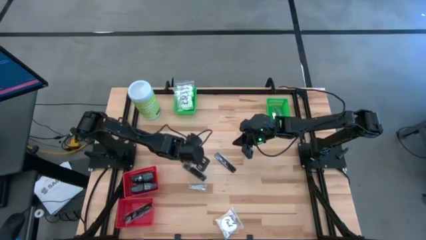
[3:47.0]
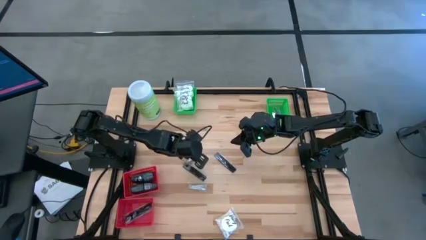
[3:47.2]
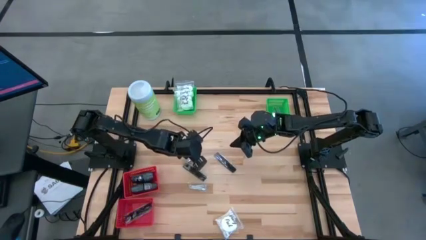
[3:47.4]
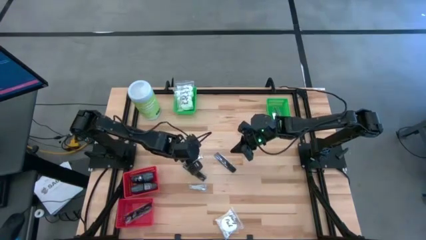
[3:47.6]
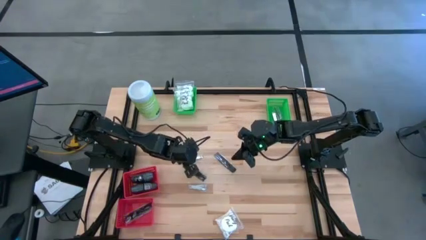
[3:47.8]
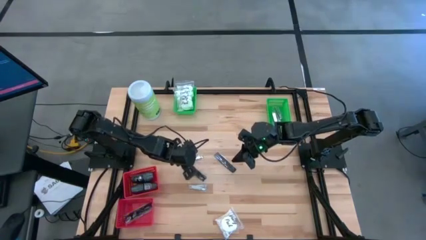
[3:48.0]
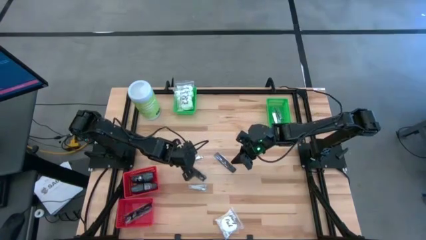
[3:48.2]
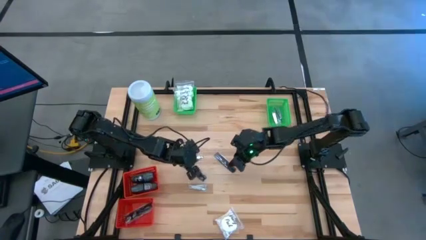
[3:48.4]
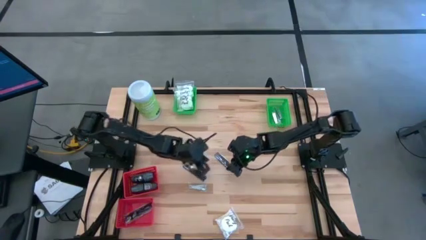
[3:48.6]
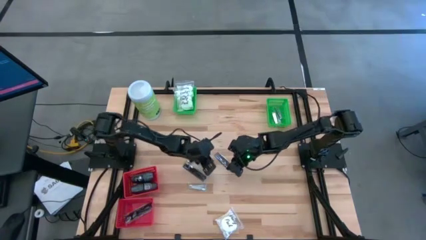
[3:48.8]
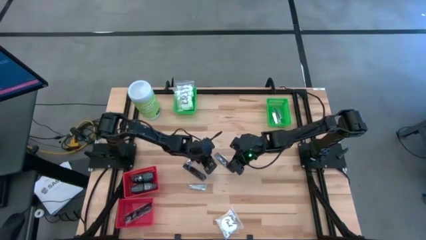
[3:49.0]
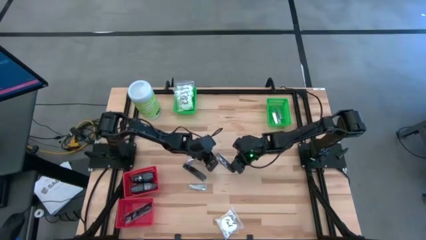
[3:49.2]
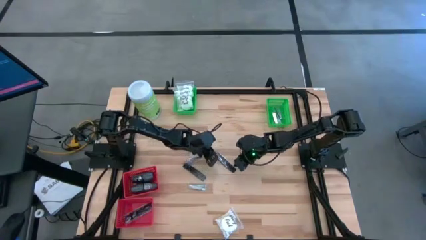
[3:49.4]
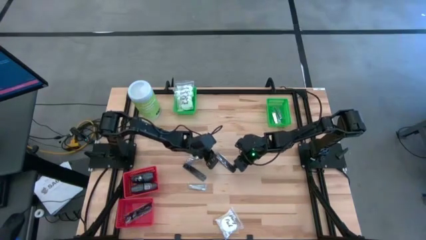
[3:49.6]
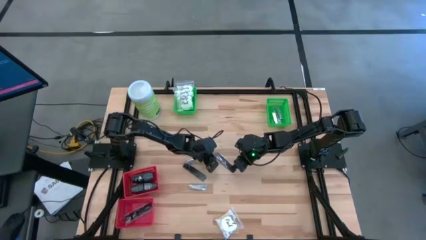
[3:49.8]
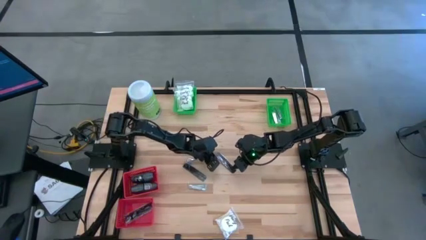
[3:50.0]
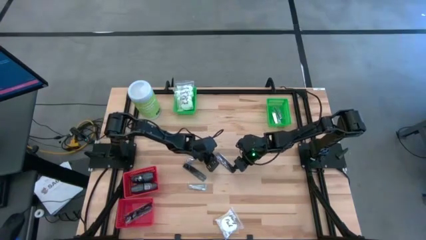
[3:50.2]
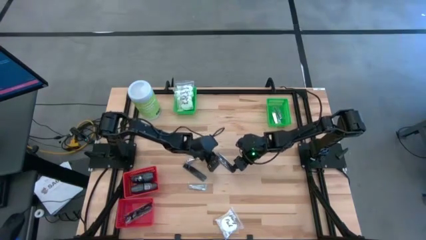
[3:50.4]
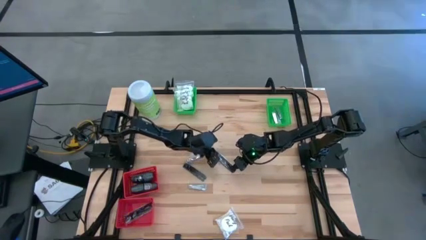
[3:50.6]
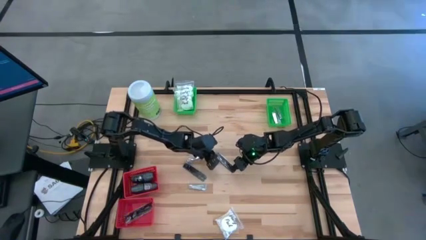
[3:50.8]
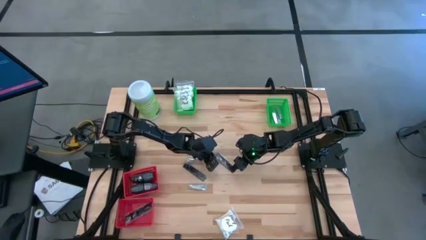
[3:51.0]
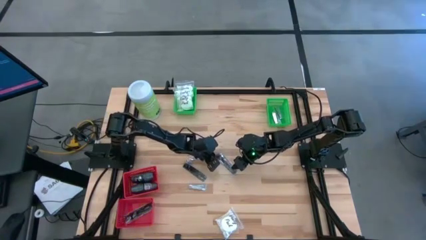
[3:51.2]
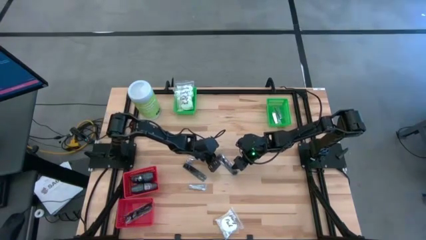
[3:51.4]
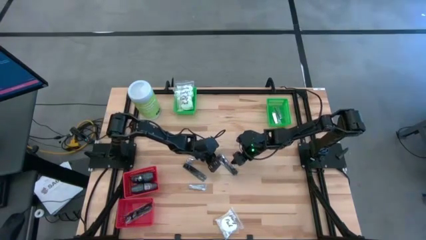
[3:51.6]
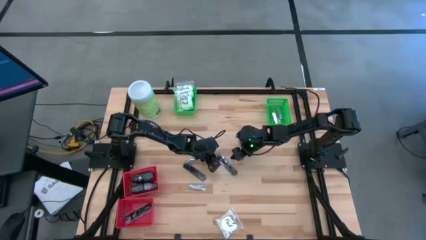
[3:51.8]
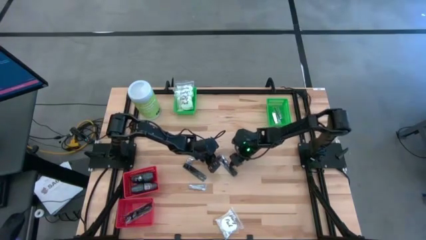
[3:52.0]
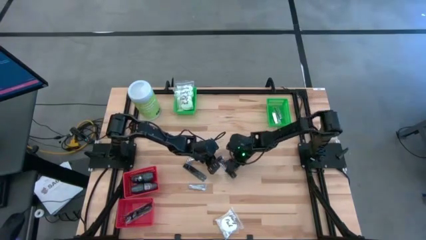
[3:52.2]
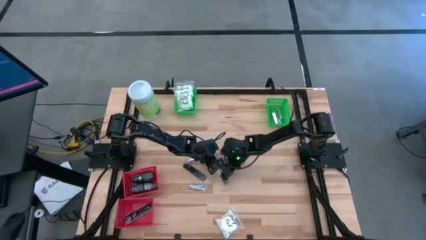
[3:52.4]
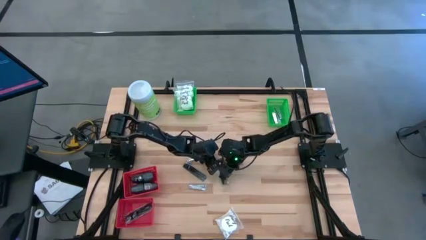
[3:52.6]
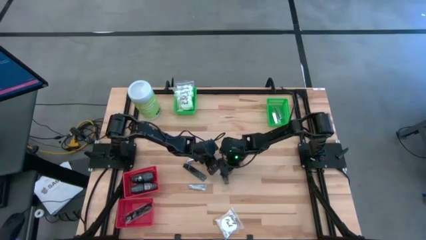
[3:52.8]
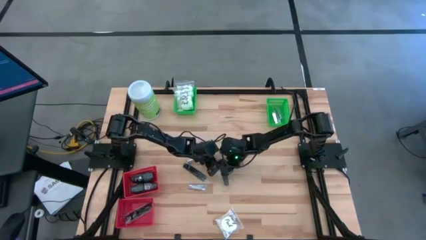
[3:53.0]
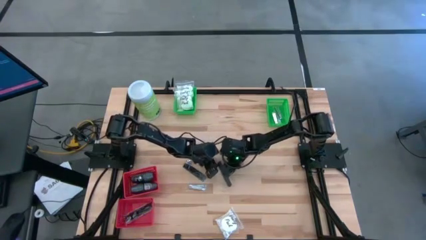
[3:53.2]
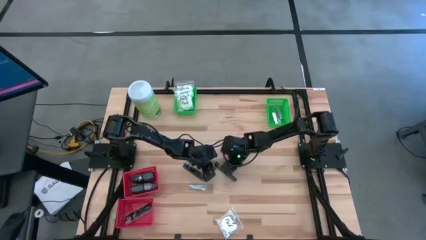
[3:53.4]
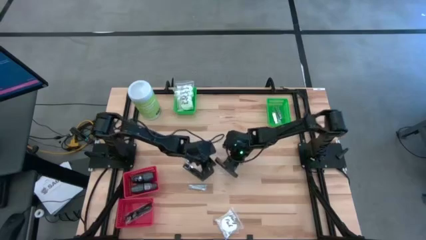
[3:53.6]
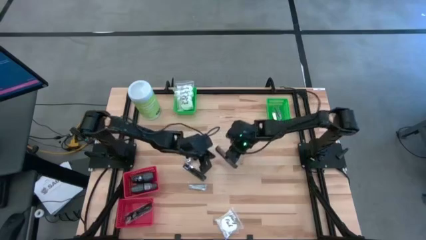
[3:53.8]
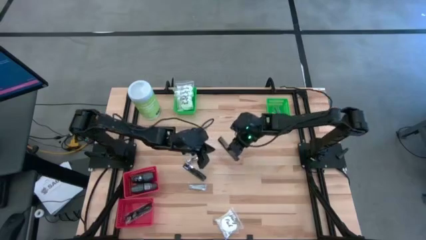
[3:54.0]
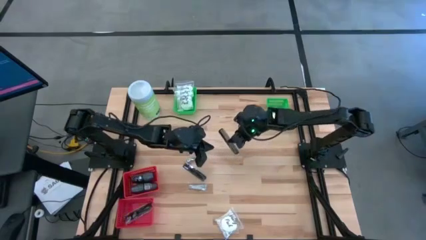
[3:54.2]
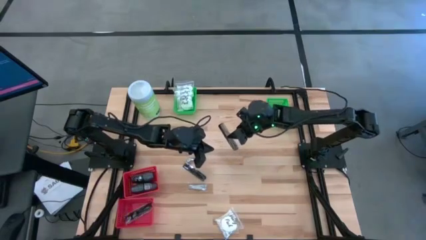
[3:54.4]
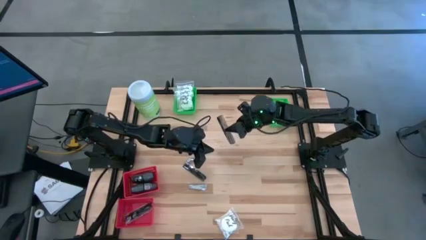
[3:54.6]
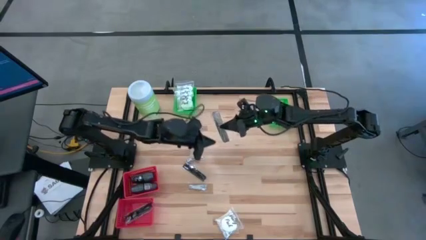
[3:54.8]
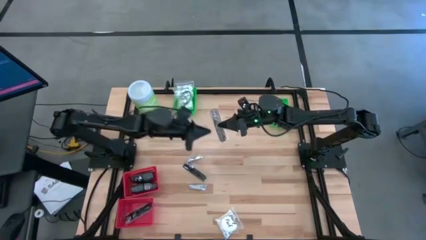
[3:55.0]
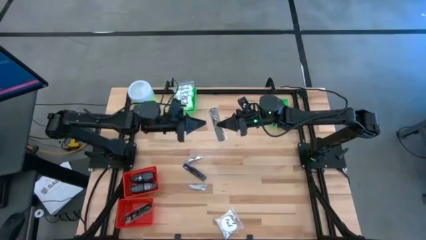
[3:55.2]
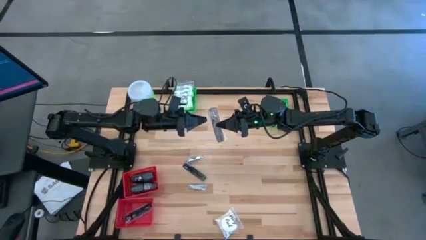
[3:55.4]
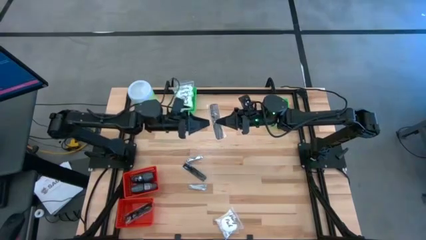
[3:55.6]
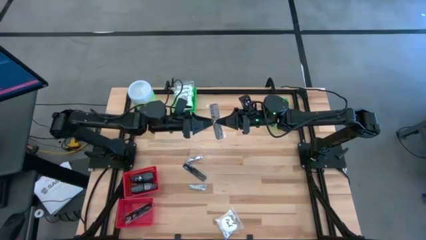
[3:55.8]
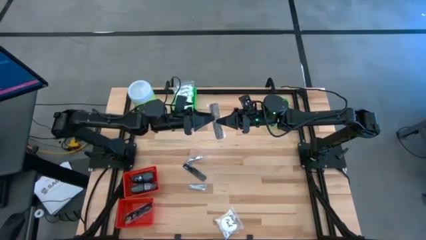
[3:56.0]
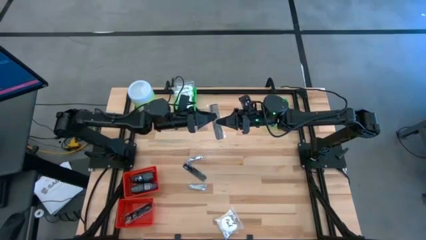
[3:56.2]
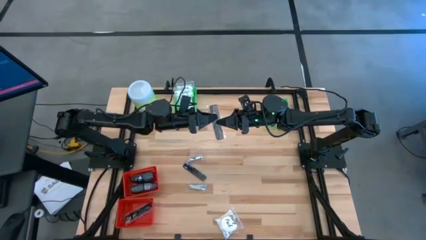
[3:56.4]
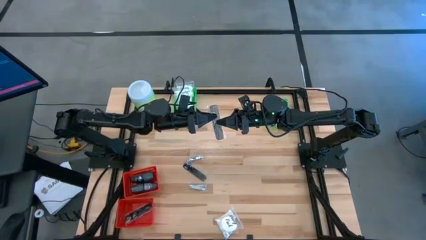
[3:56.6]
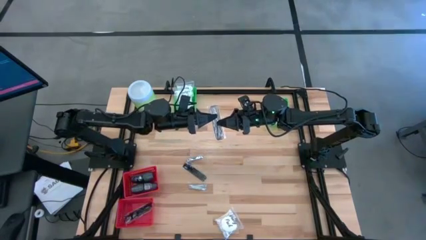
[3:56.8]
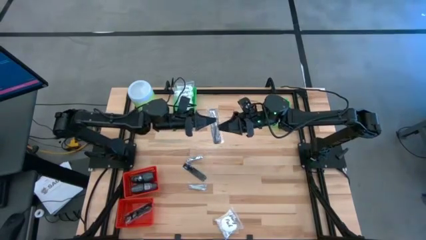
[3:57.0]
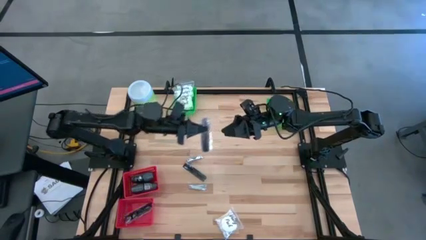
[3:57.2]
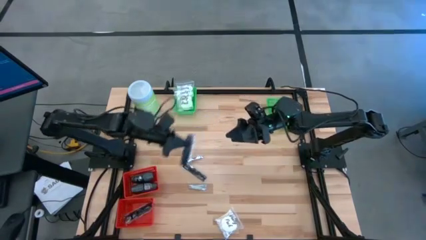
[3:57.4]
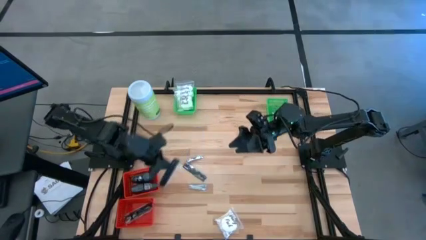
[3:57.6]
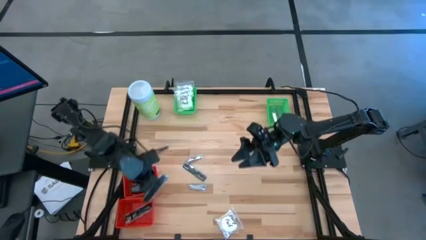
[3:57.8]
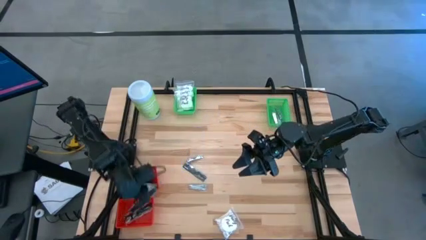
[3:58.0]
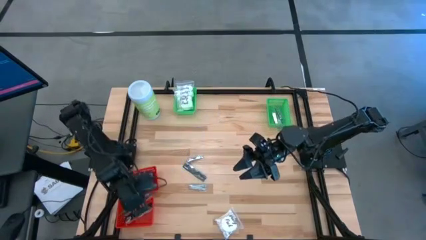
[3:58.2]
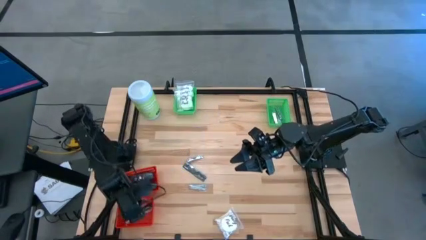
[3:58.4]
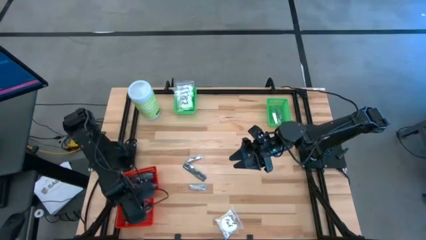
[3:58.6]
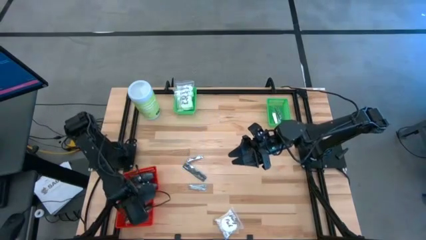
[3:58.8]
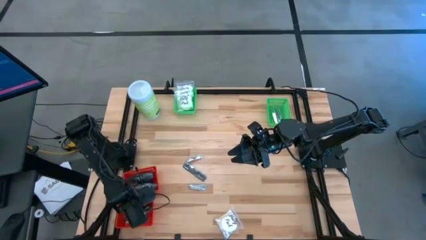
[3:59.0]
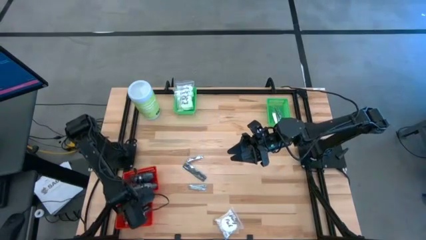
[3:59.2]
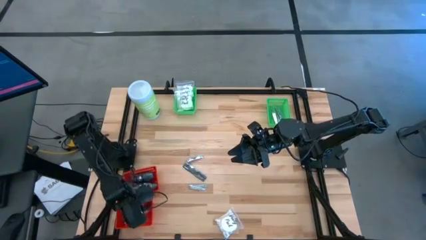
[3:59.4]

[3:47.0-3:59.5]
Task: Pick & Place Travel size toiletries
Put the black comb into the bottom red basket

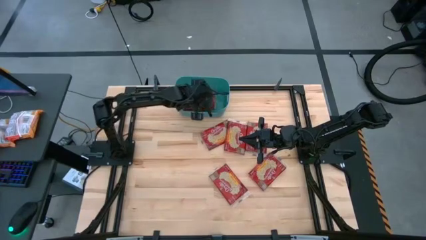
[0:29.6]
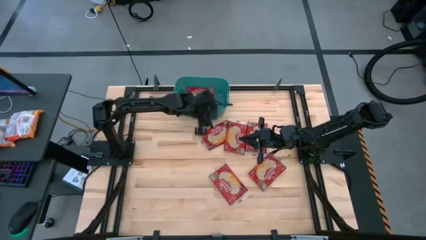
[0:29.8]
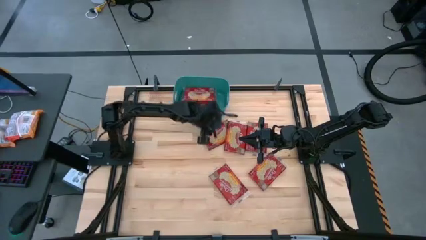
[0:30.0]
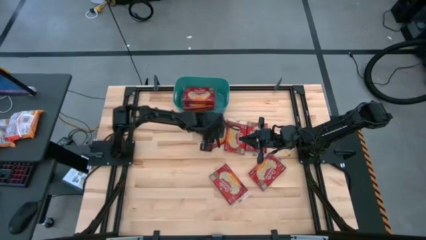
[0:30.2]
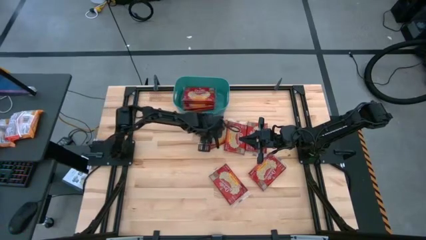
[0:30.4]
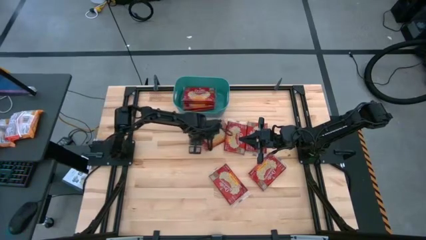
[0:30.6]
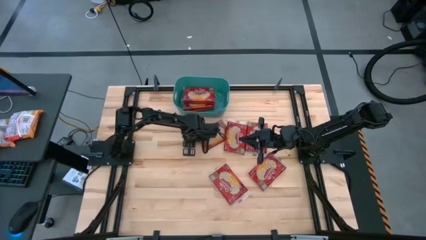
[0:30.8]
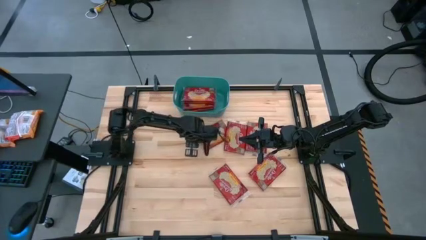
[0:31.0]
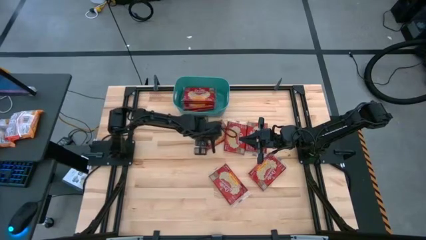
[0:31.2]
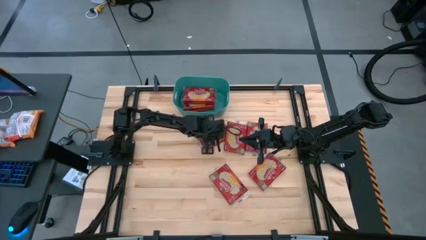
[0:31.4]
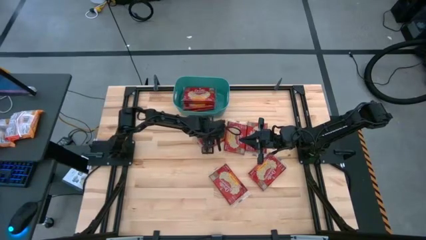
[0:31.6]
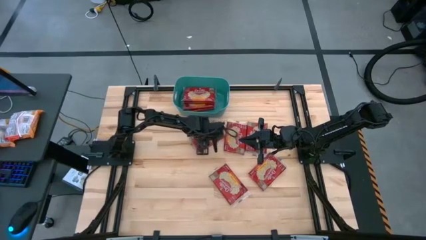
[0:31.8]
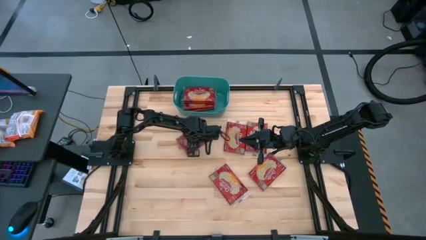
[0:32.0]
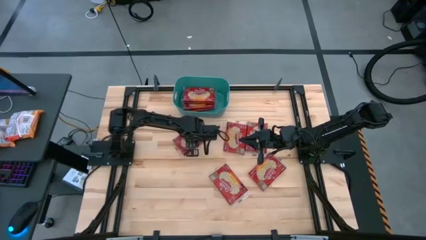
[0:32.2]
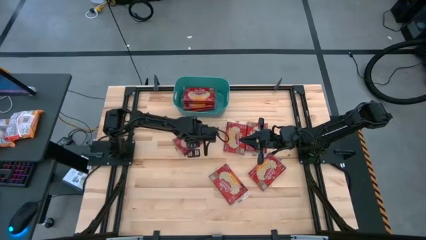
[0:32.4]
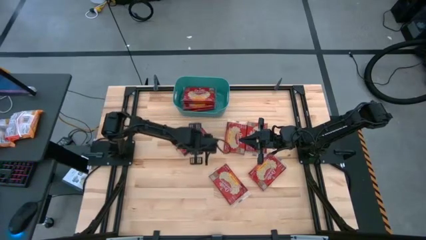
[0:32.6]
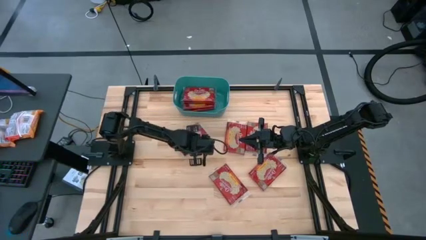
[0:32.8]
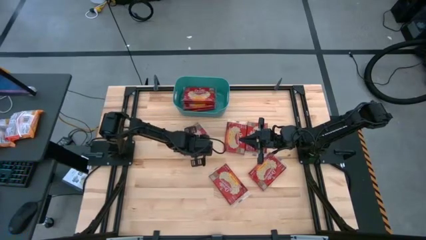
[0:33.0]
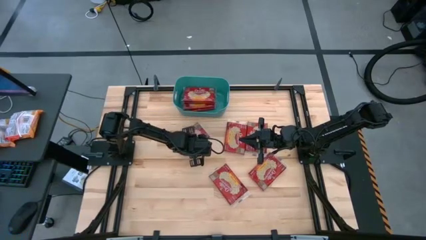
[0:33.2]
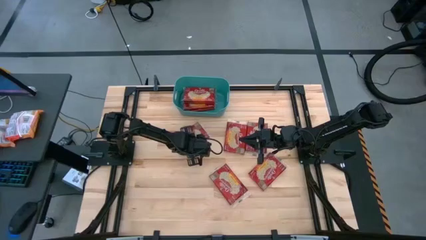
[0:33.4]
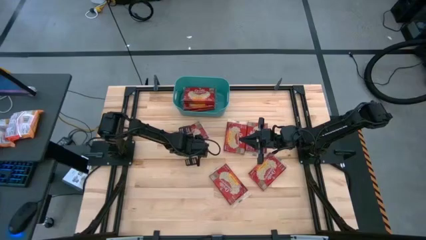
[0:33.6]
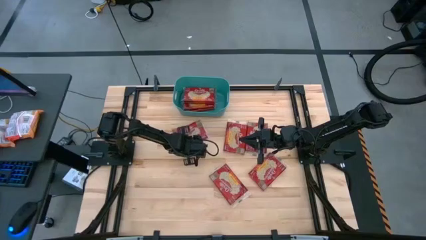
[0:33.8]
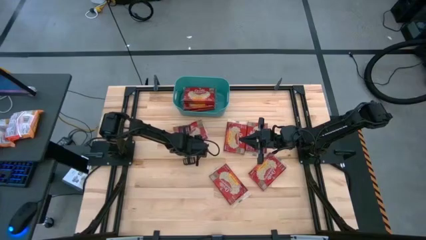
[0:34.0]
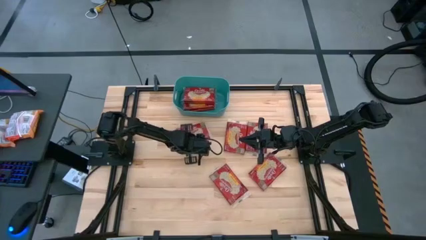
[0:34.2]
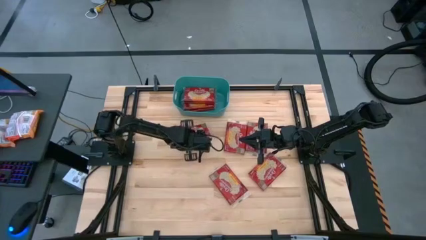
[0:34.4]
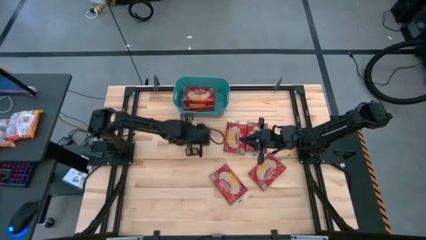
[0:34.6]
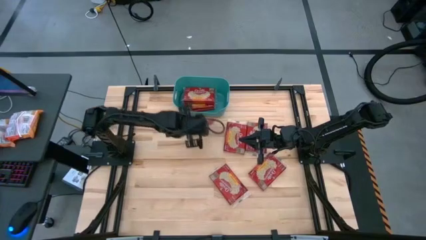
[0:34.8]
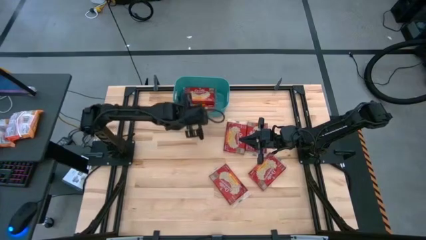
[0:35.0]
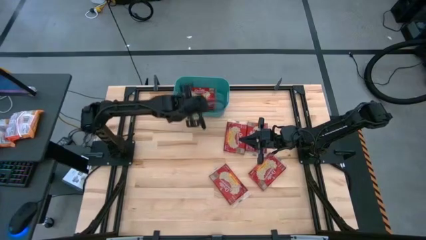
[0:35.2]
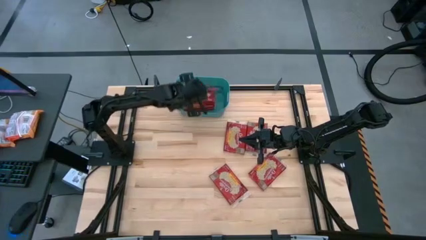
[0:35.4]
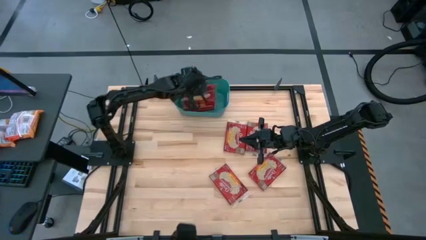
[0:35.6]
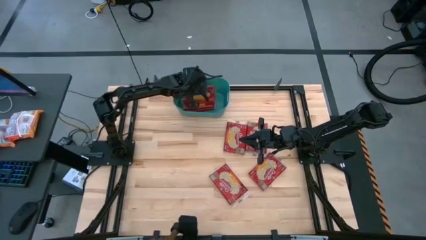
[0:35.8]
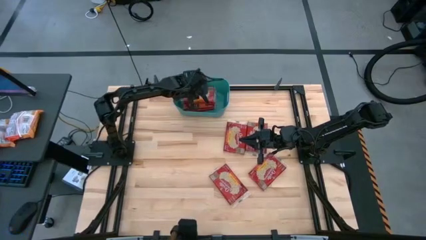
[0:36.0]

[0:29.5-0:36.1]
Task: Sort popcorn bags into baskets
Put the popcorn bag into the green bin
